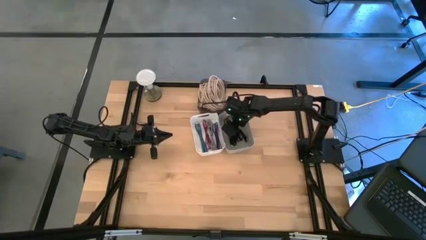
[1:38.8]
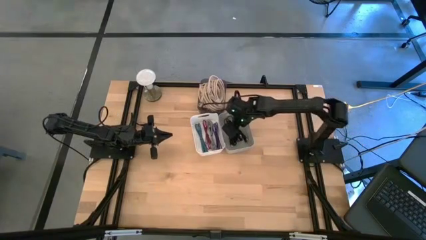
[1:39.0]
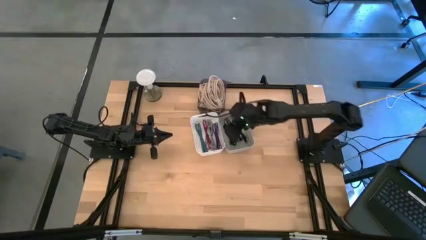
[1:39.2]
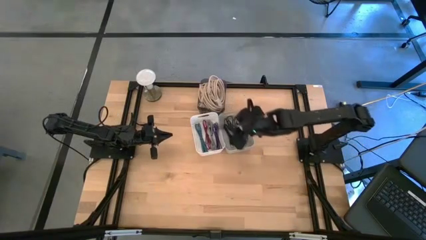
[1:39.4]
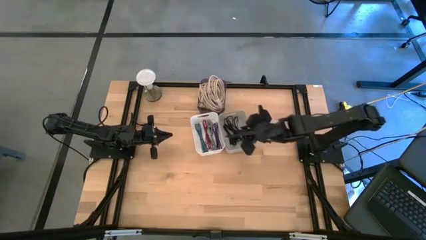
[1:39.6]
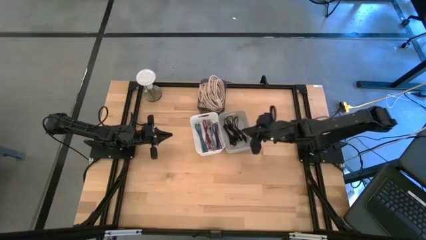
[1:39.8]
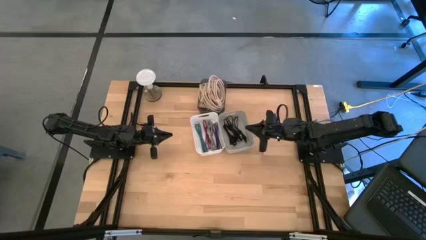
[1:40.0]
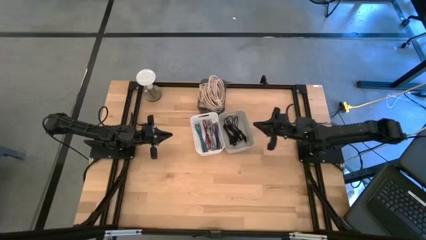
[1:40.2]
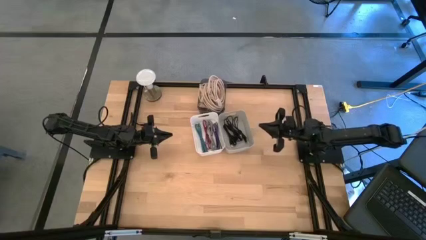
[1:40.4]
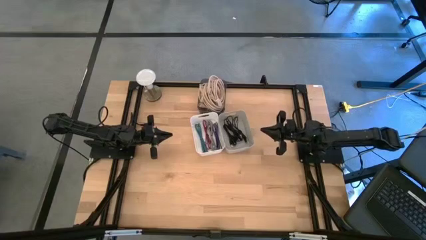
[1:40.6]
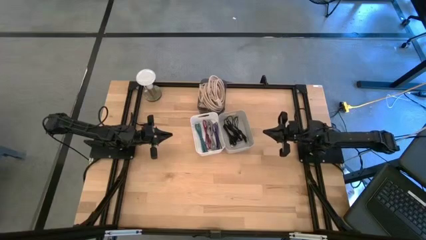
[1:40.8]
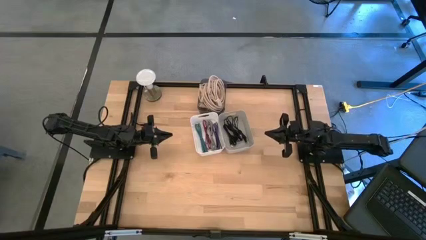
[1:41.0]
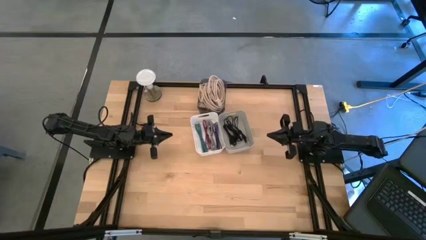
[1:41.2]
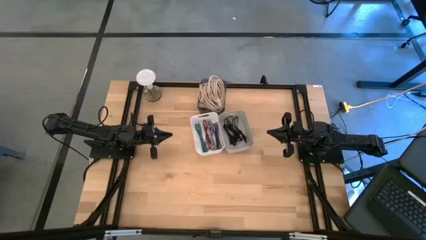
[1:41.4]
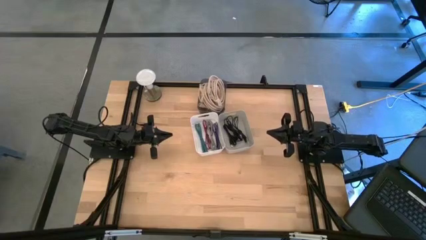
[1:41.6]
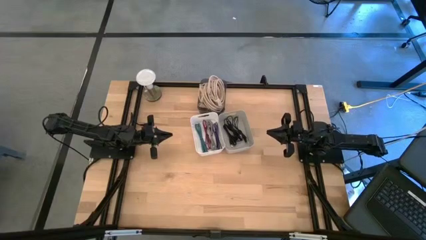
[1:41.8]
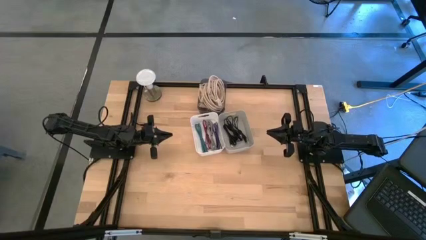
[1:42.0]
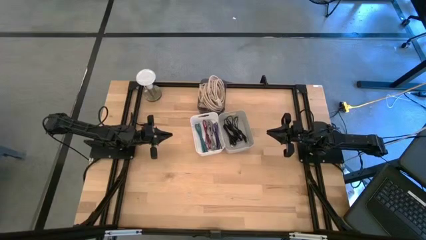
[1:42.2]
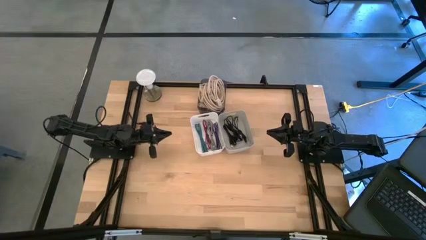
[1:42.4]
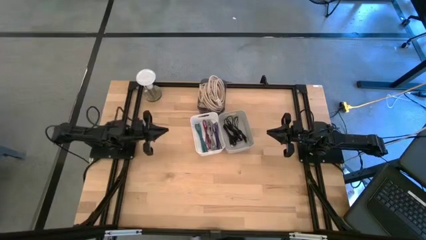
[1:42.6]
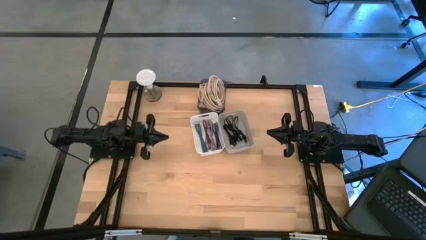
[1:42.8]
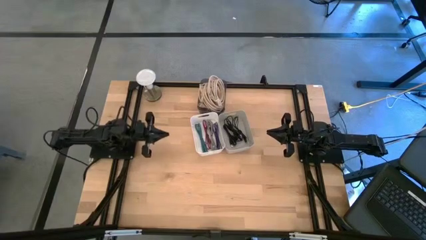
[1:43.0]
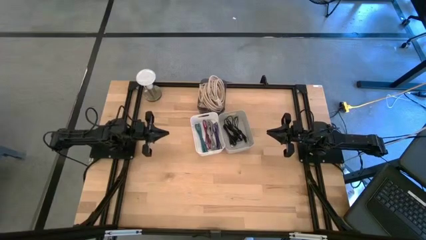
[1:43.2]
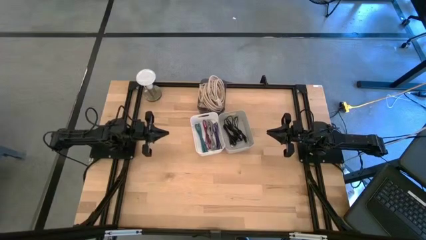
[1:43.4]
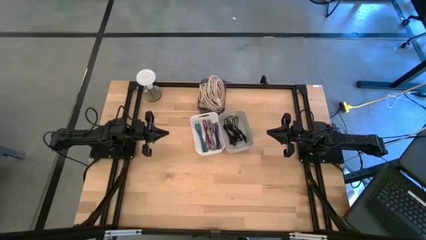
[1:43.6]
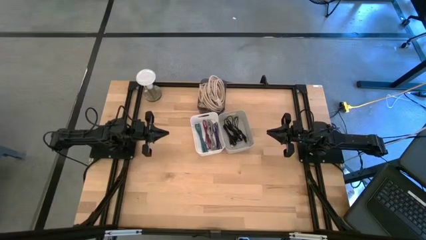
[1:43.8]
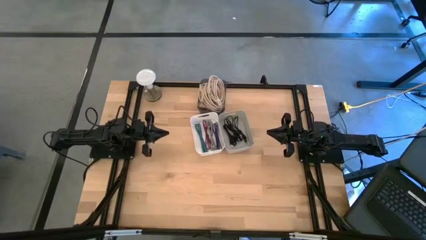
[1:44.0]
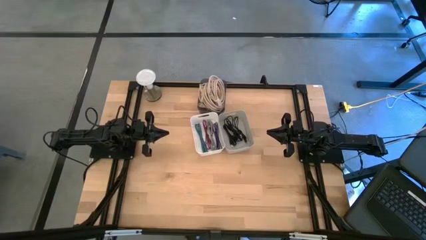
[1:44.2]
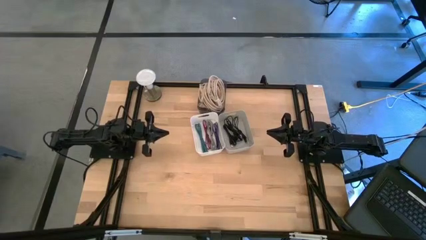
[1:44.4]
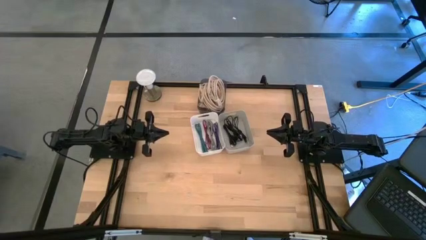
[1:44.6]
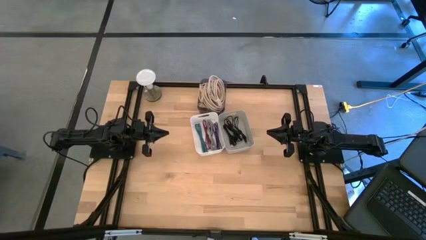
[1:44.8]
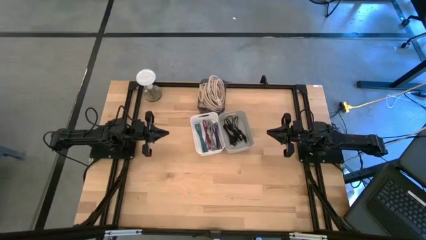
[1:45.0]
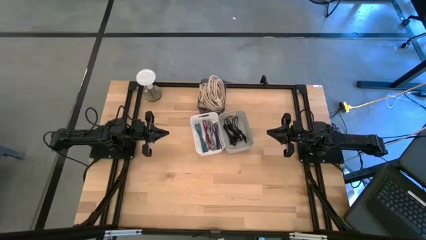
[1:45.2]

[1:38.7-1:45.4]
Task: Pick & Place USB Port
Return to Home Position

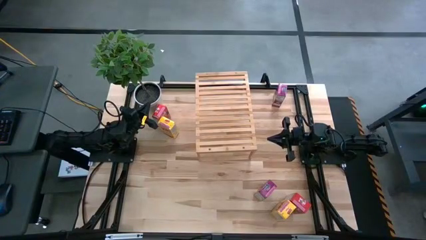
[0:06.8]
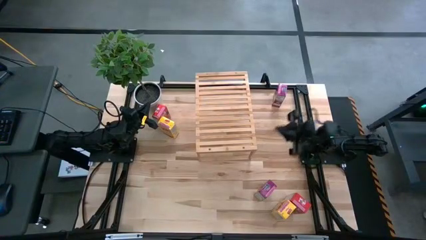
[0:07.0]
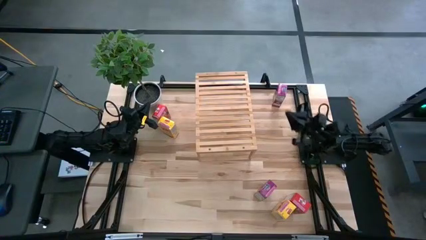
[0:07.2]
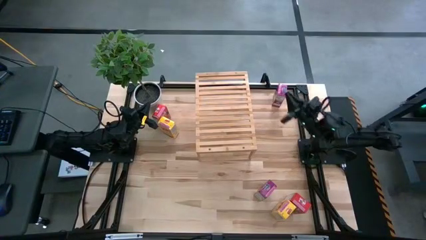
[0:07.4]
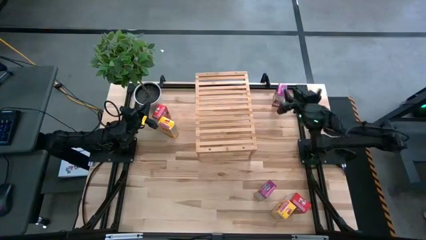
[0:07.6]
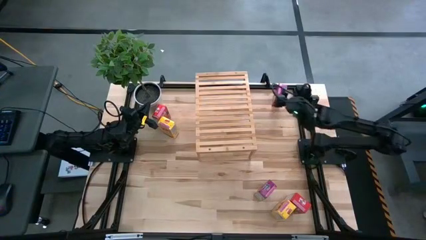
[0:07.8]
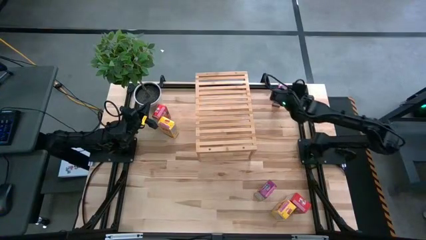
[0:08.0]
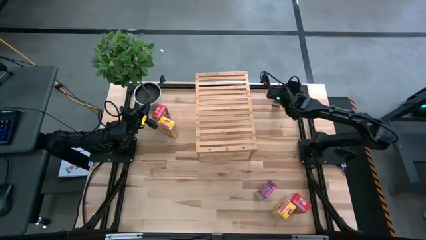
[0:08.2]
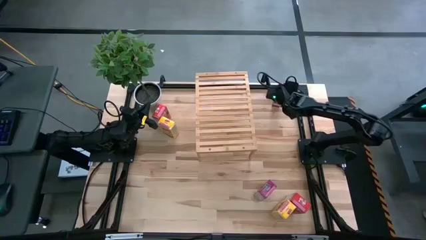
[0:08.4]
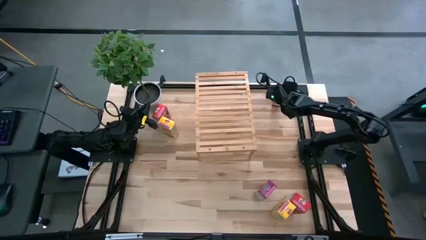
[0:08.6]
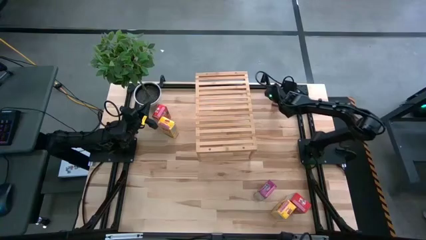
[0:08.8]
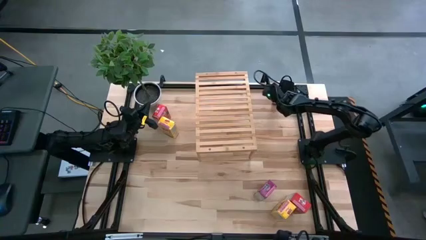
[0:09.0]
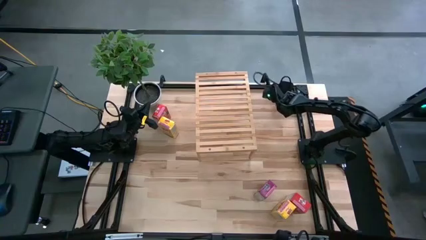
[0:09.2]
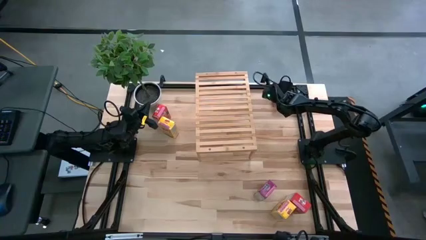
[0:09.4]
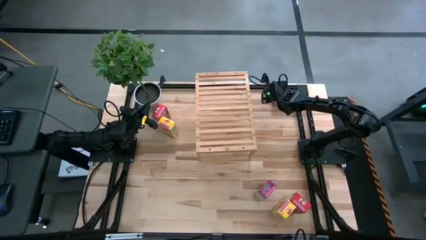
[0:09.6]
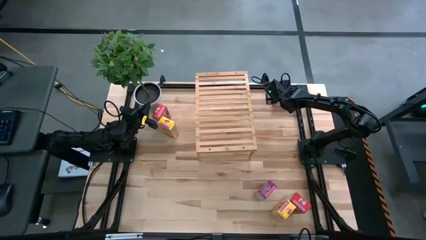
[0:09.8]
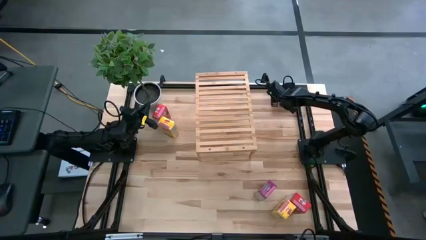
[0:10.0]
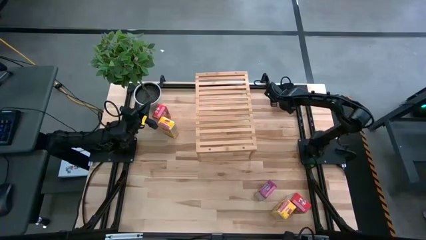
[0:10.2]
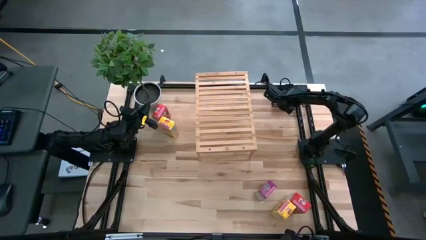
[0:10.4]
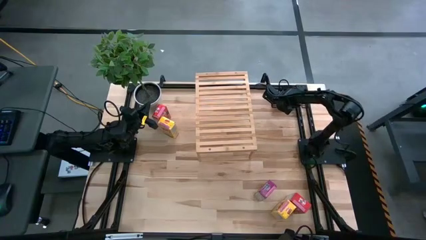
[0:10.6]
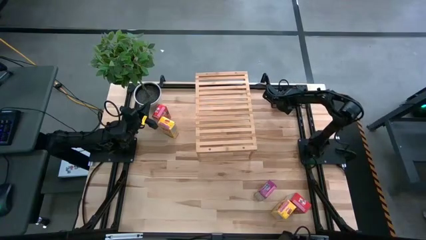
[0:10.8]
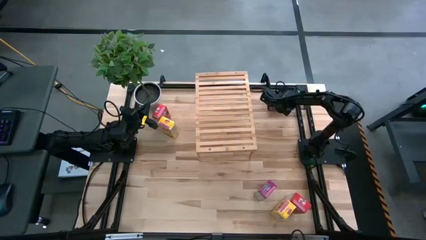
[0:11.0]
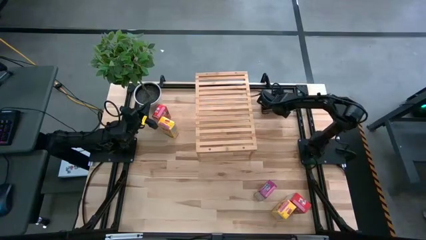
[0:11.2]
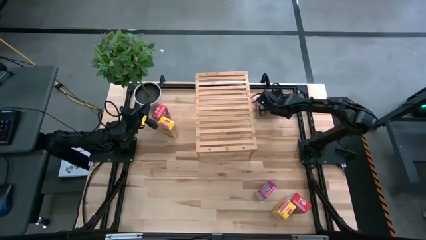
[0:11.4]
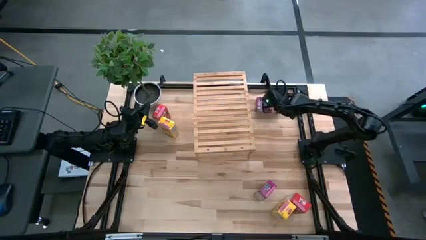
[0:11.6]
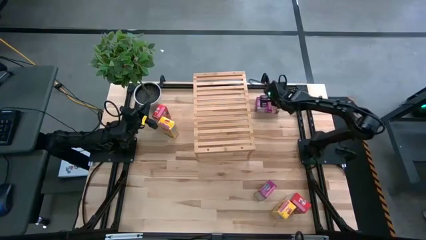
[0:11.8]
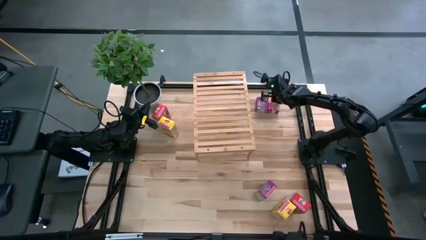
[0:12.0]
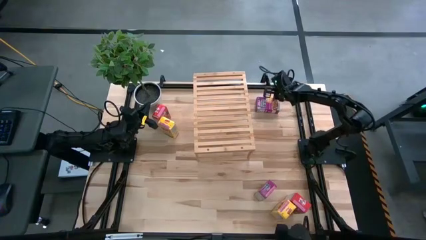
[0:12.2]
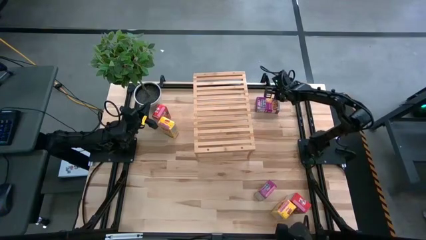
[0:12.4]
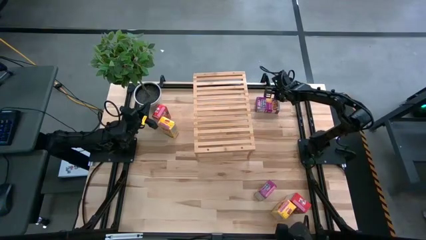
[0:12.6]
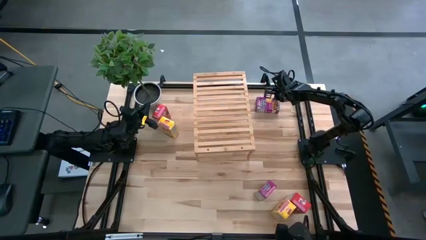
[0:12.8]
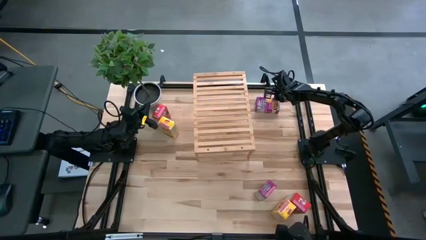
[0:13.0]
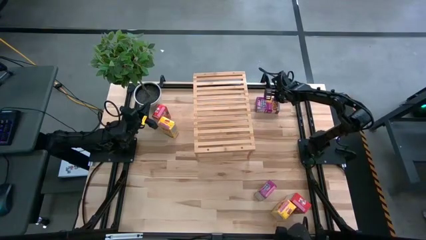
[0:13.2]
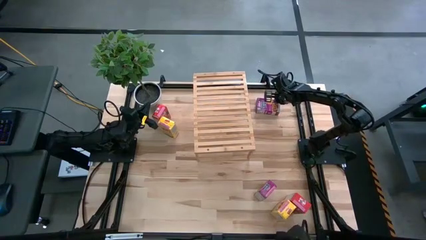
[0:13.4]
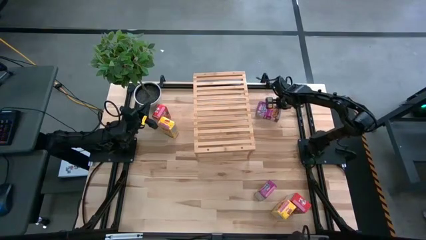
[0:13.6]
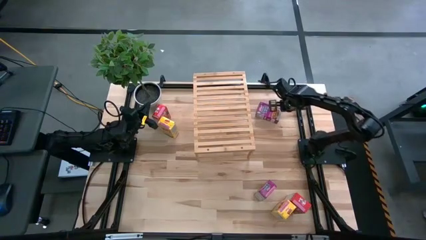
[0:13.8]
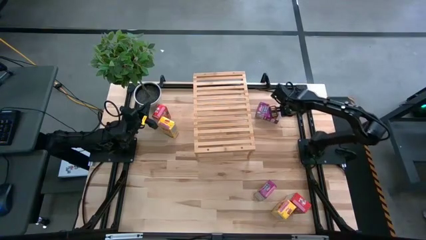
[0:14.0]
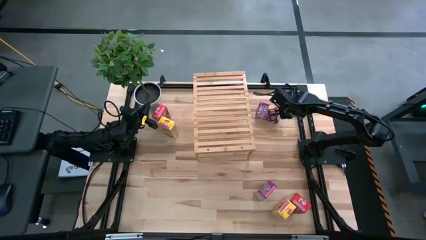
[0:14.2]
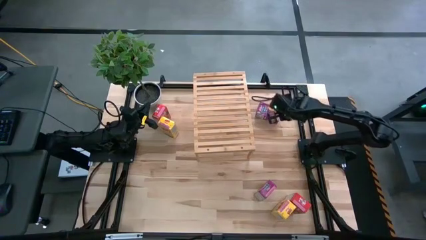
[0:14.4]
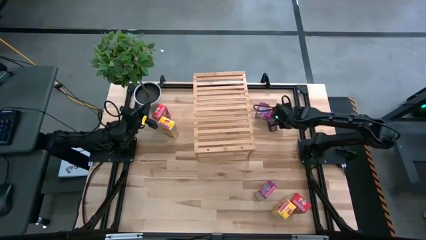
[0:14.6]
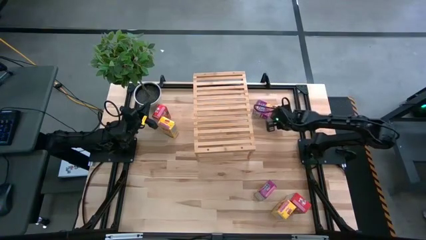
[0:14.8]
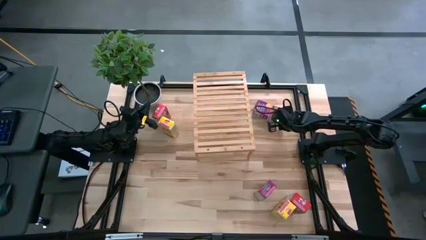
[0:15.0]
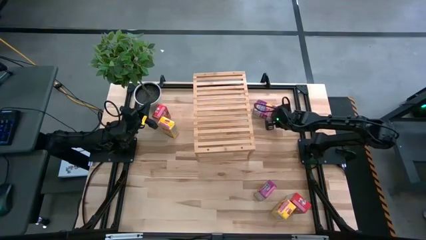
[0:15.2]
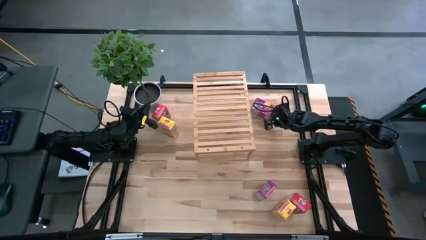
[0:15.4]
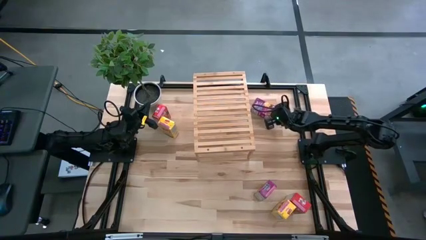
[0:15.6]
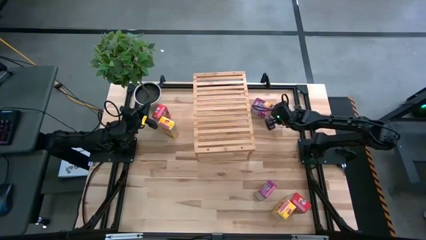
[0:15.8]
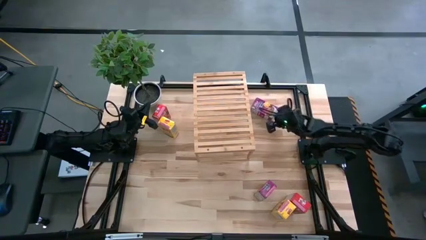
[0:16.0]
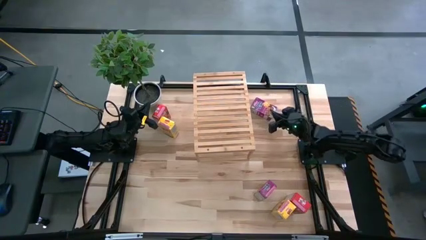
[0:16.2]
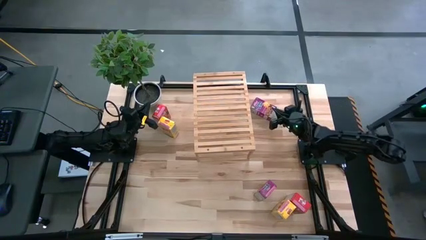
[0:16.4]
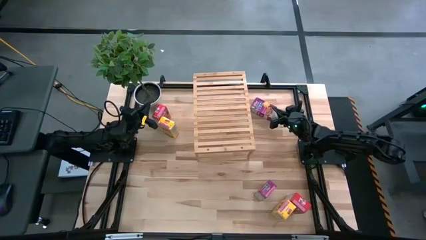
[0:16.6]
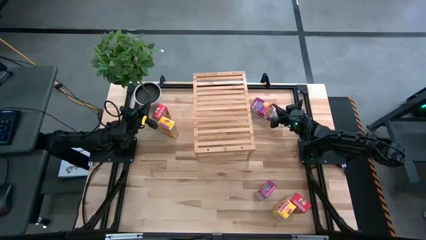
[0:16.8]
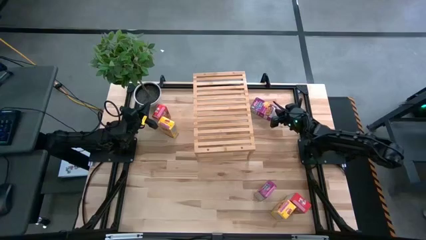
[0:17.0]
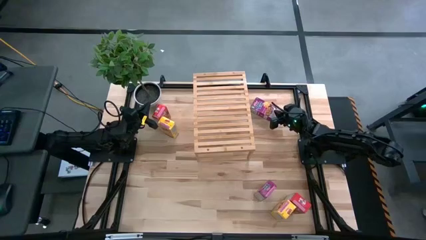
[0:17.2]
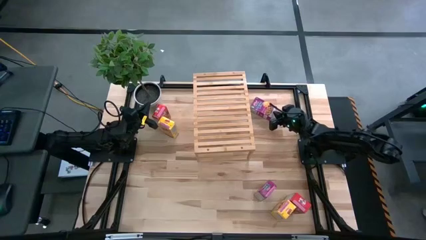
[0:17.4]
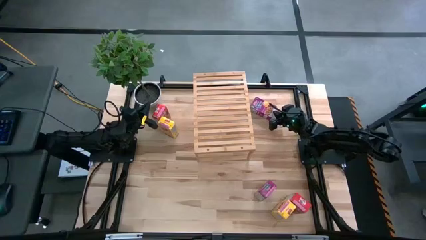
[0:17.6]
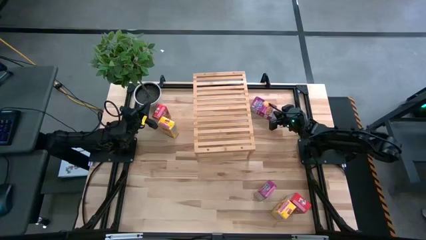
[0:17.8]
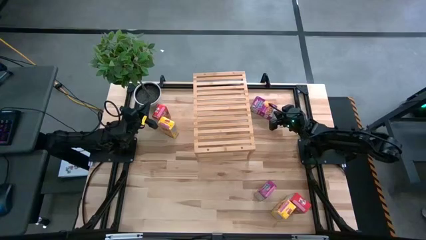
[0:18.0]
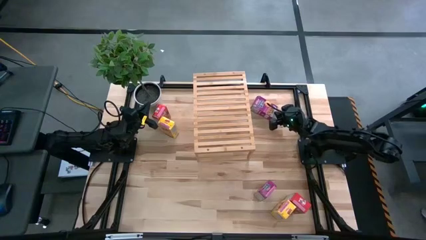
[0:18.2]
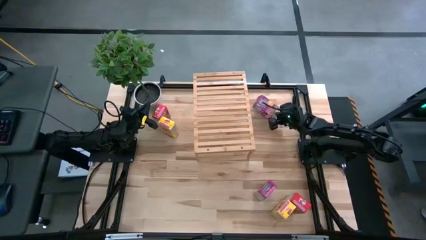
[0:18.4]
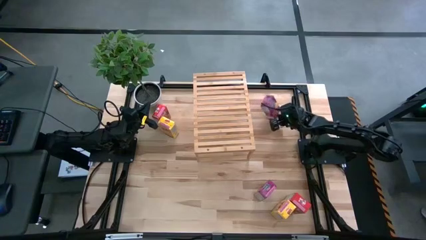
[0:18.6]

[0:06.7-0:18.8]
Task: Stack cereal on shelf
Put the top violet cereal box on the shelf
